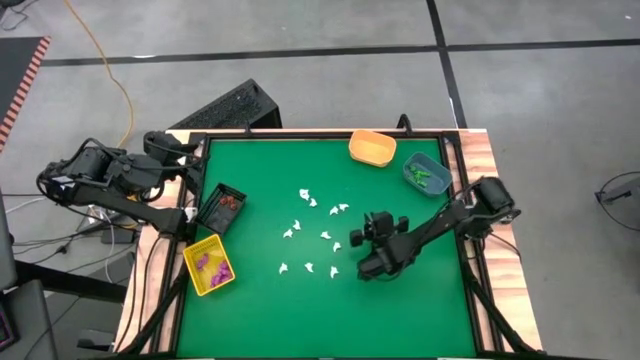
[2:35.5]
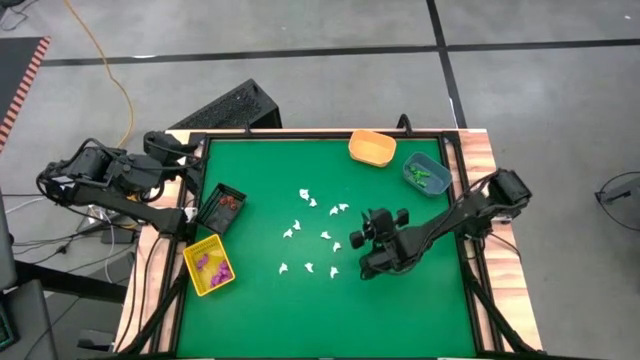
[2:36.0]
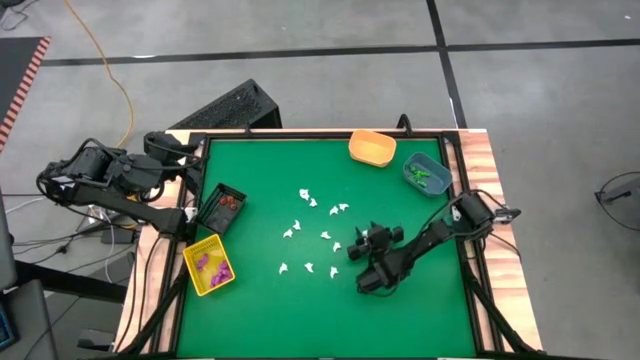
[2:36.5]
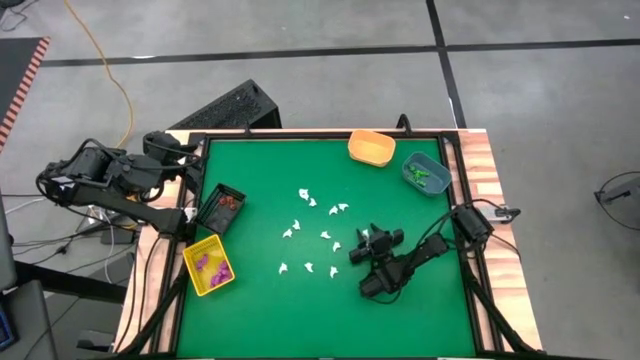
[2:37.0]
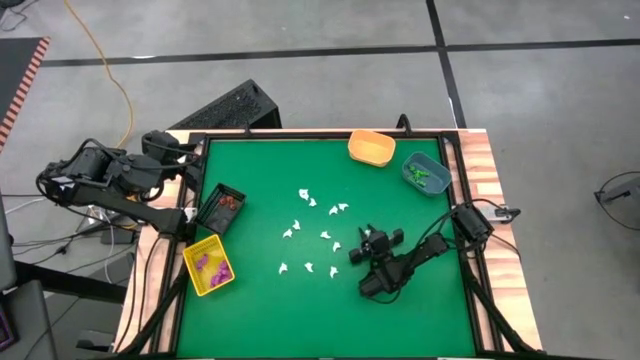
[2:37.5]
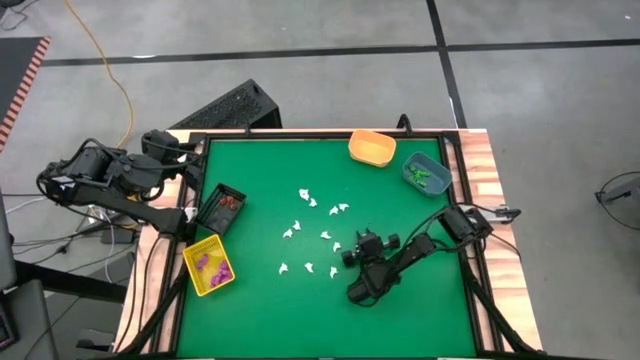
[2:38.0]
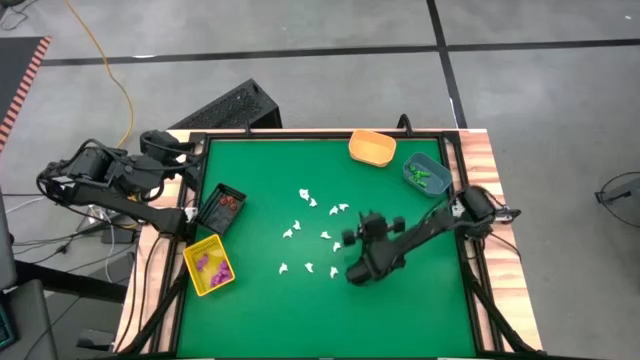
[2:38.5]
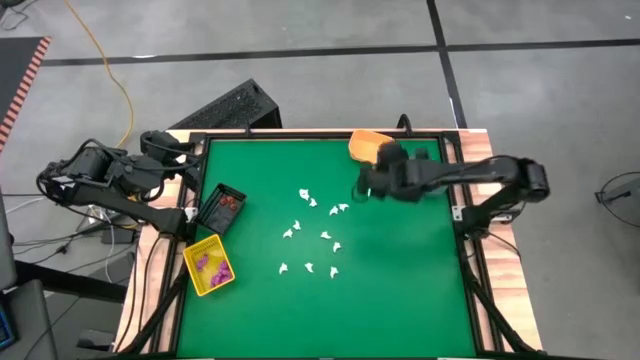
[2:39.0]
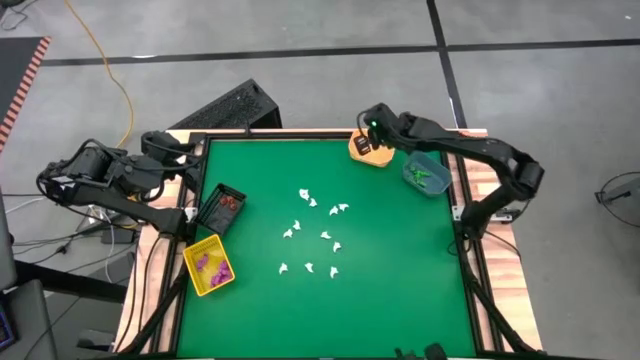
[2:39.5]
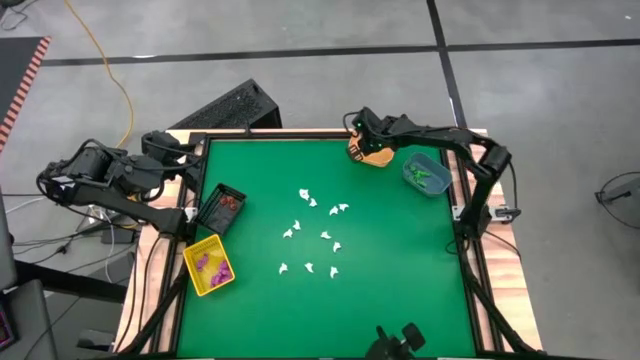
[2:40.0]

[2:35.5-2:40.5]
Task: Sort Halloween decoration
Put the white ghost toy into the light orange bin

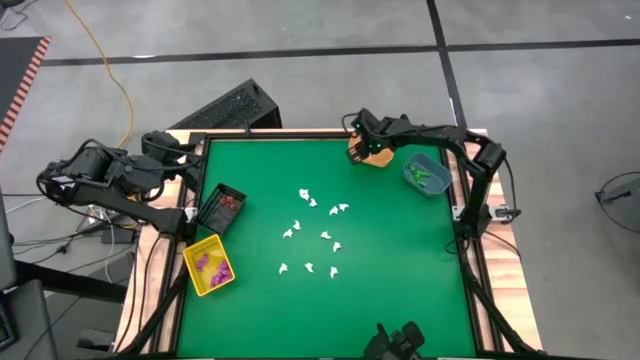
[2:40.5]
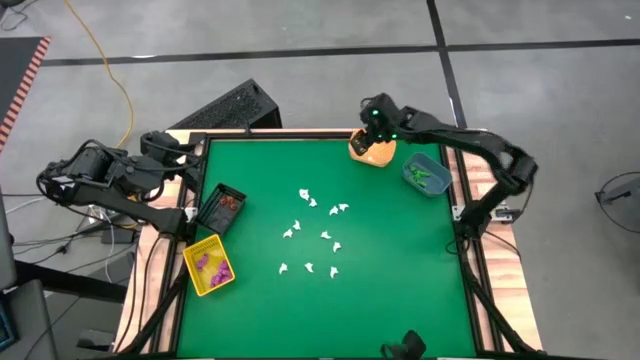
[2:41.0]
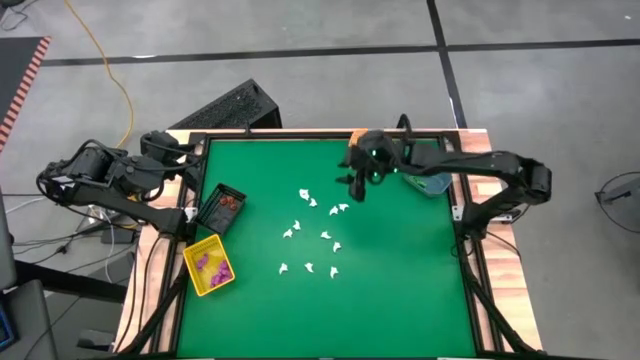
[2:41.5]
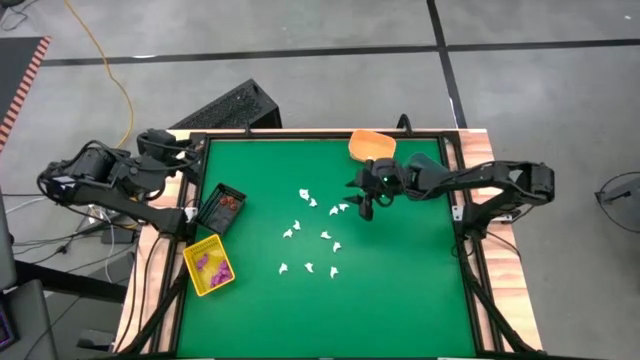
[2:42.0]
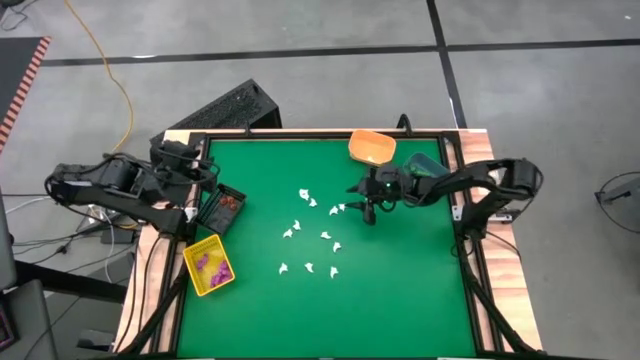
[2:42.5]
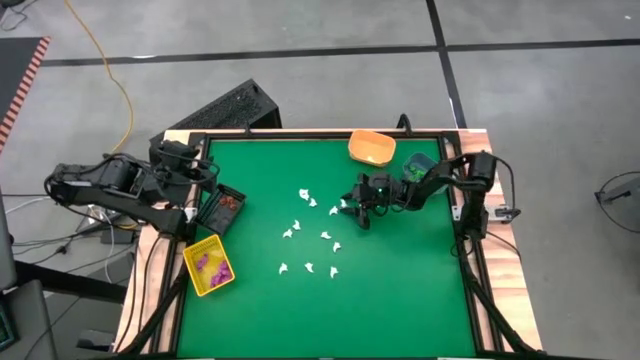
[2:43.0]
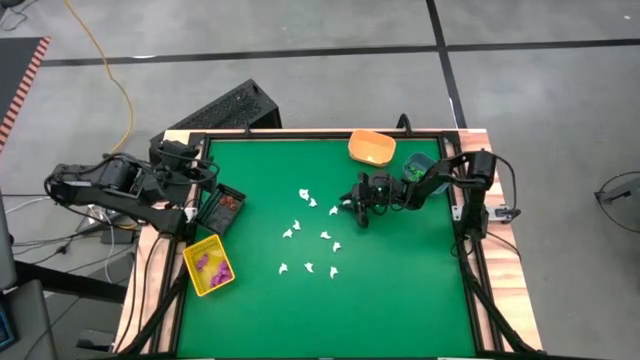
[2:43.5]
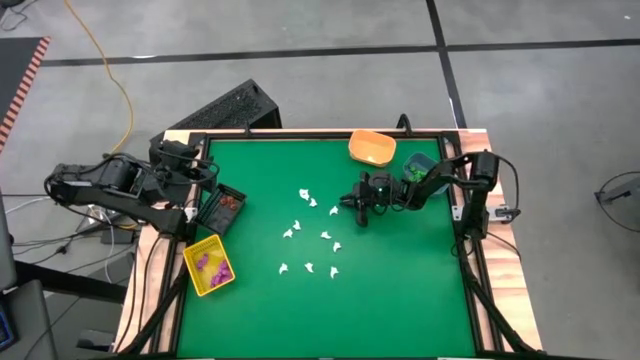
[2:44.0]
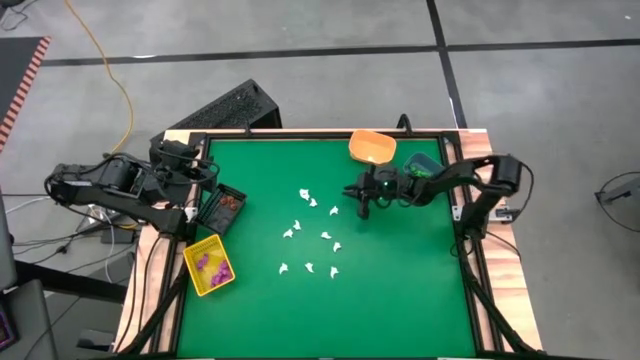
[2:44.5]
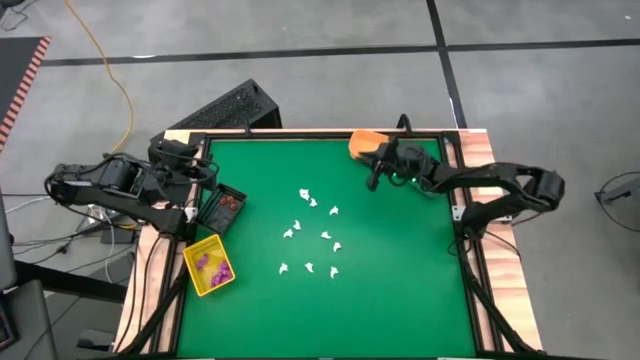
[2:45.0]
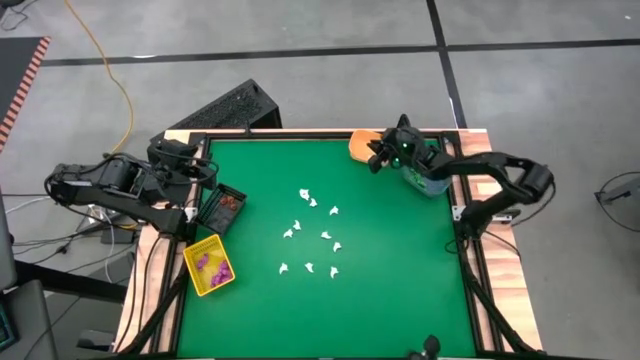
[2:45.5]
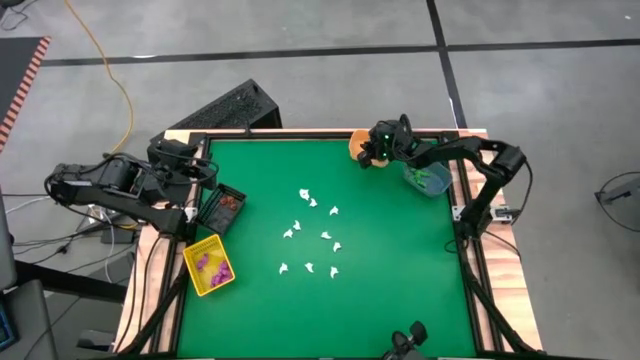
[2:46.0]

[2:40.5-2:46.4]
Put the white ghost toy into the light orange bin

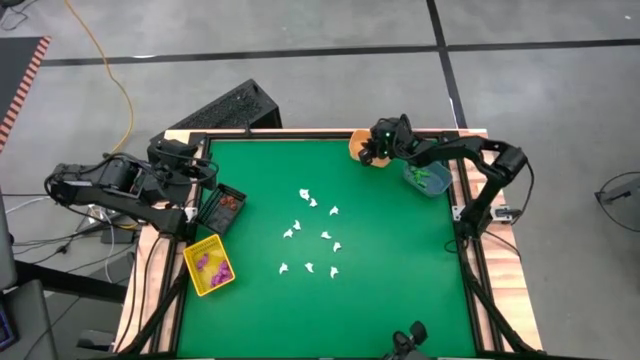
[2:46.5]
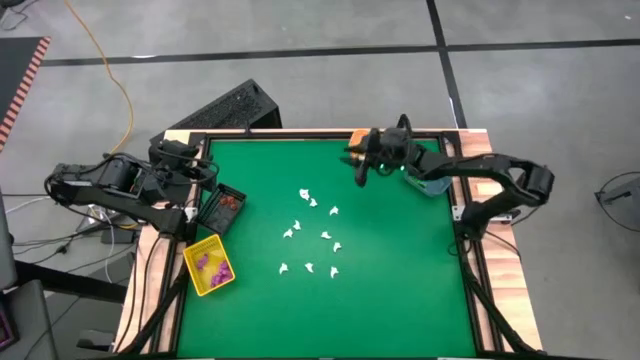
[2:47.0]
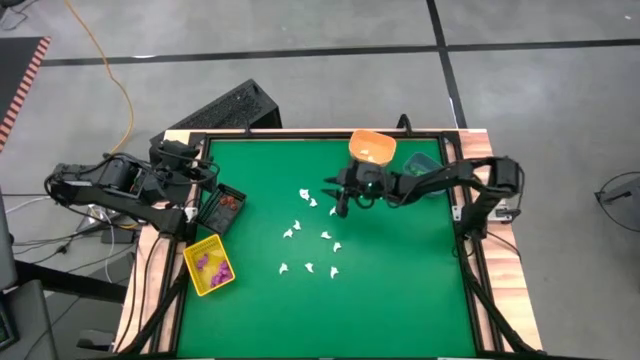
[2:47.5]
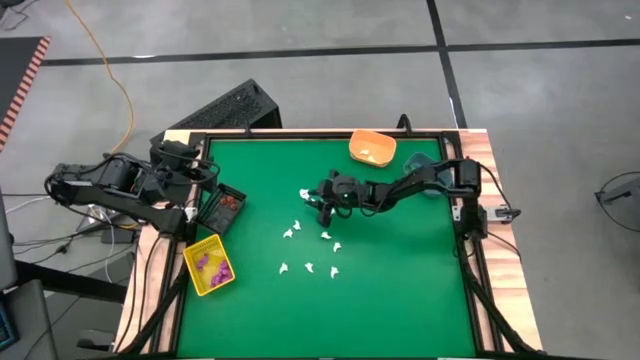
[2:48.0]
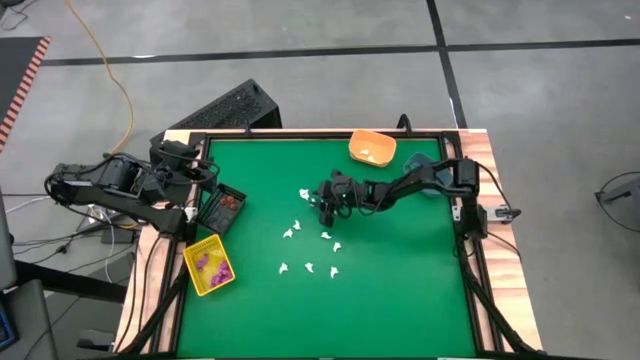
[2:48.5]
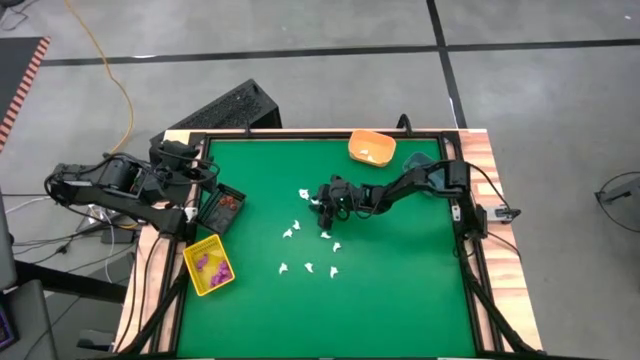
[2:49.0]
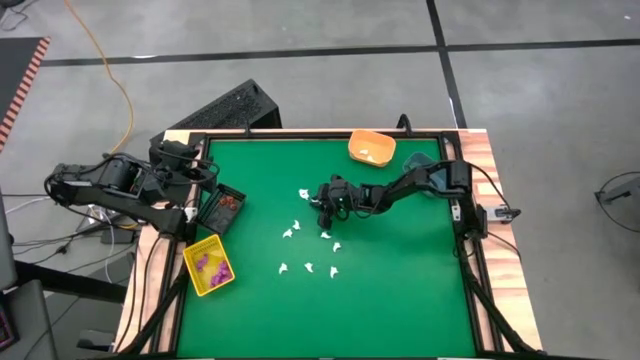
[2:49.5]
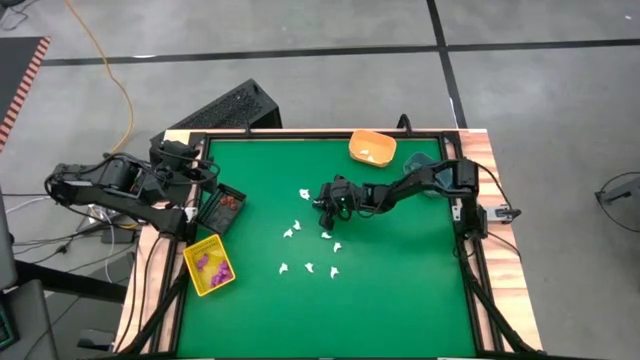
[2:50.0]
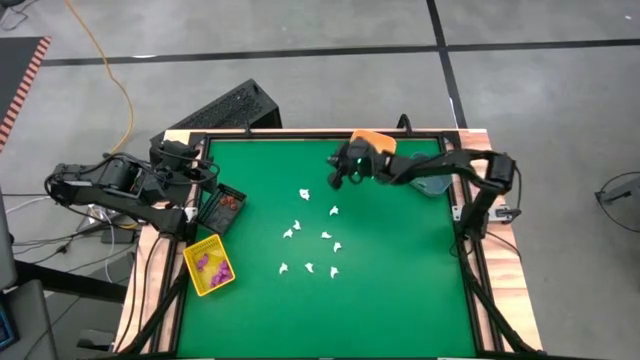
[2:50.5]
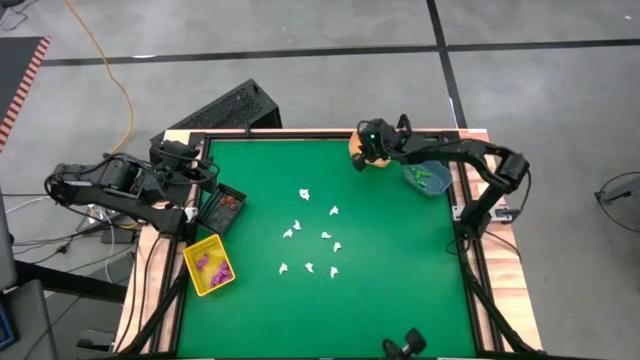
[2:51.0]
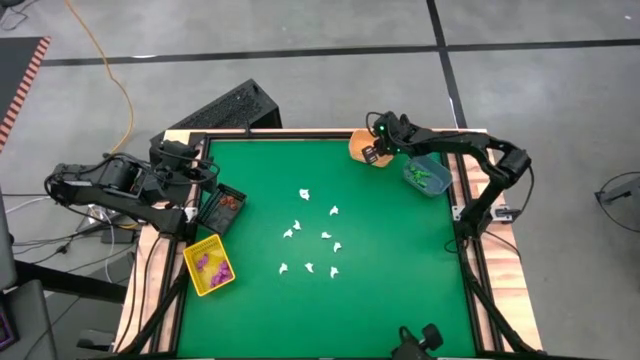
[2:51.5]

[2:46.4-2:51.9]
Put the white ghost toy into the light orange bin

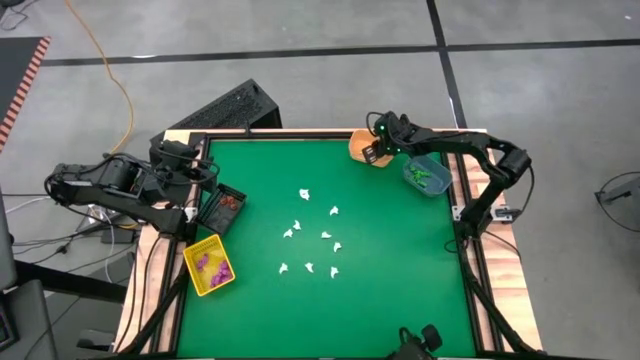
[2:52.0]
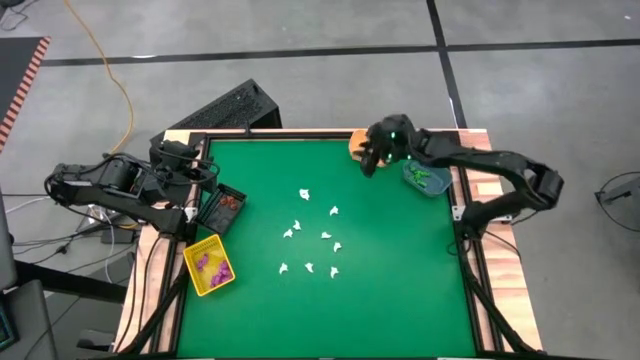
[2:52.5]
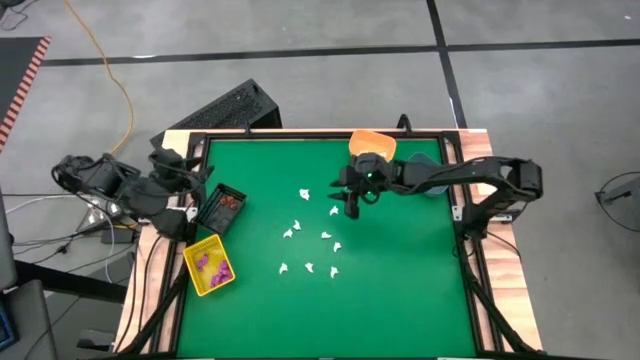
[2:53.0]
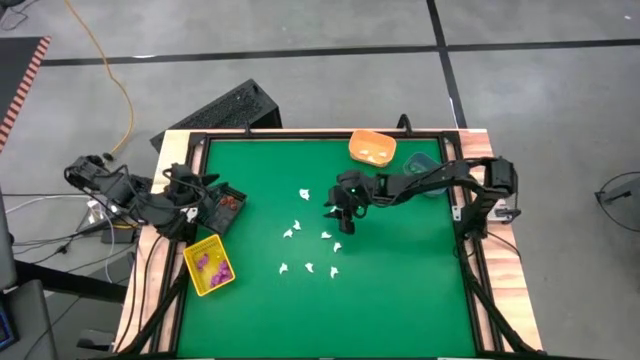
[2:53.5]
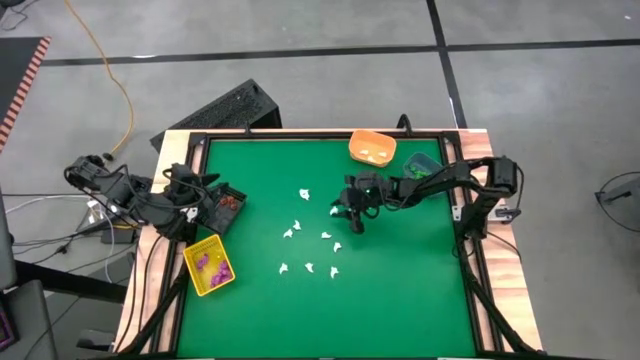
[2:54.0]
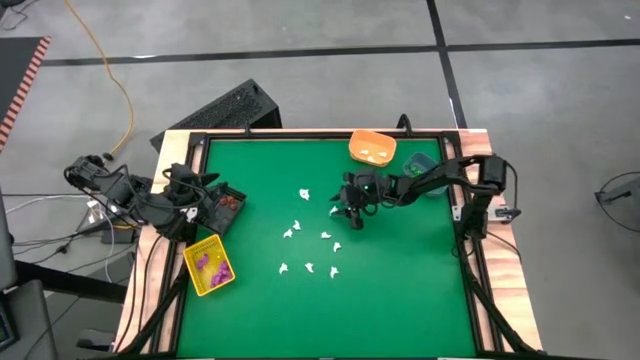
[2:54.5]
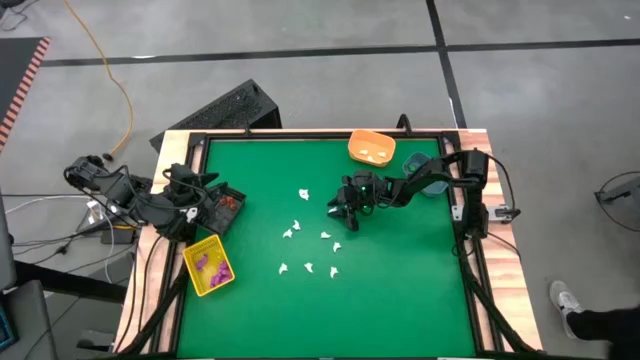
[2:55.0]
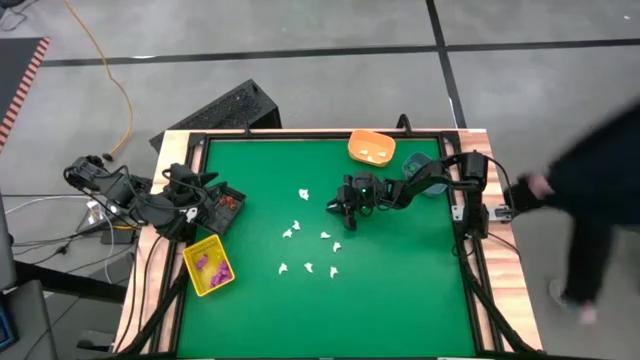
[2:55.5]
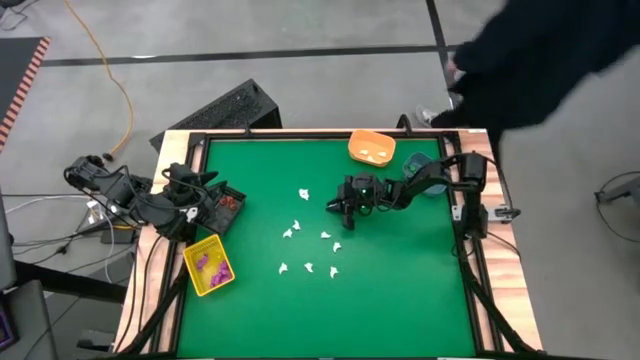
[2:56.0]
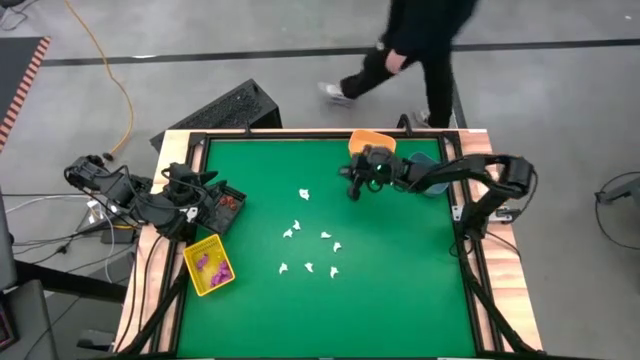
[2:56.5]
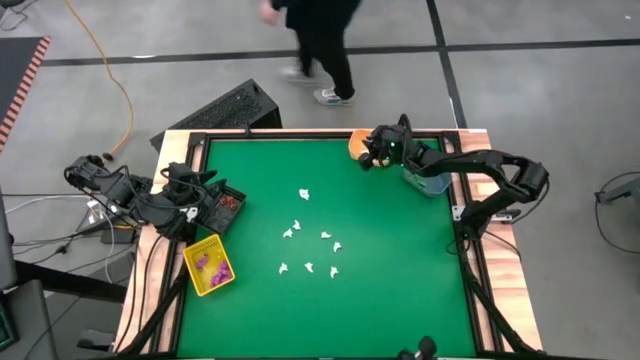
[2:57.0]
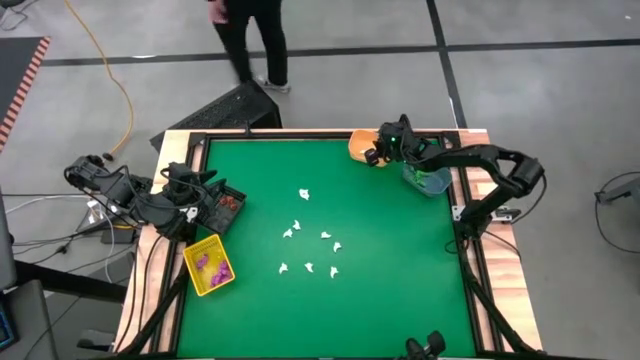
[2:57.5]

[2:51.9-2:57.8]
Put the white ghost toy into the light orange bin
